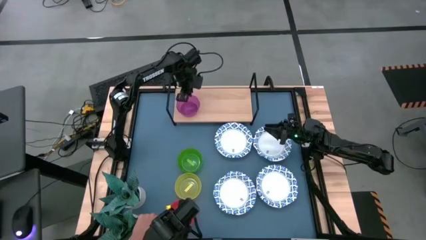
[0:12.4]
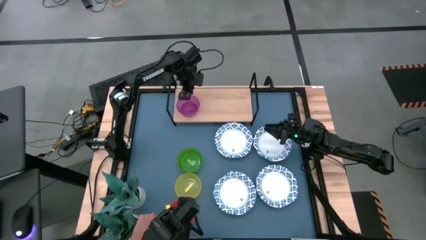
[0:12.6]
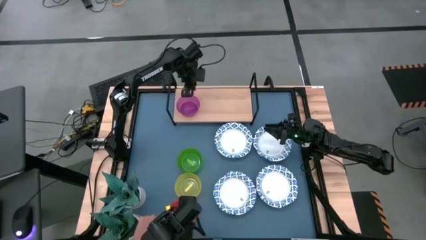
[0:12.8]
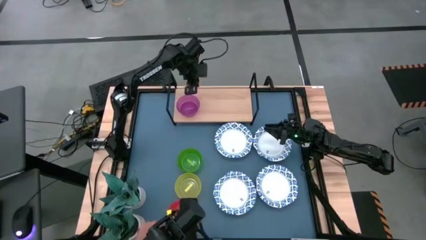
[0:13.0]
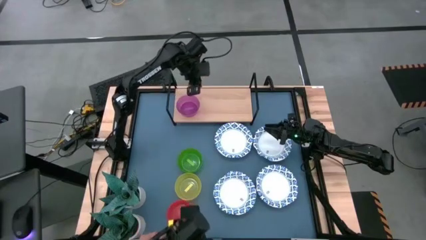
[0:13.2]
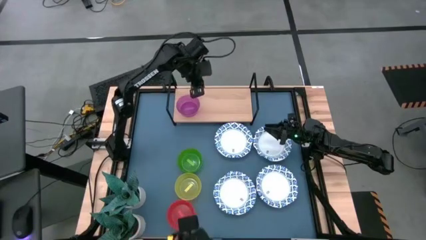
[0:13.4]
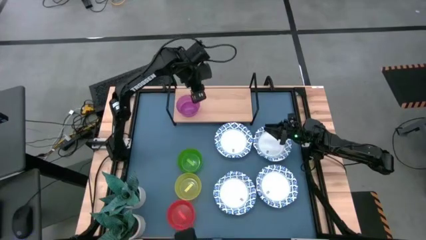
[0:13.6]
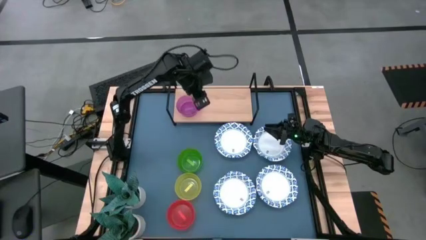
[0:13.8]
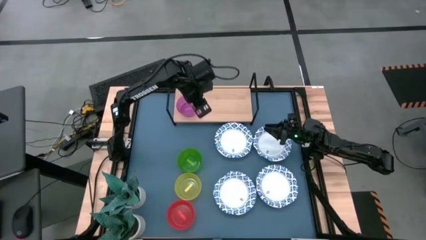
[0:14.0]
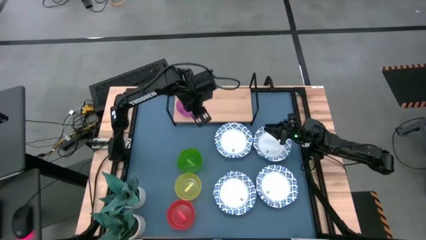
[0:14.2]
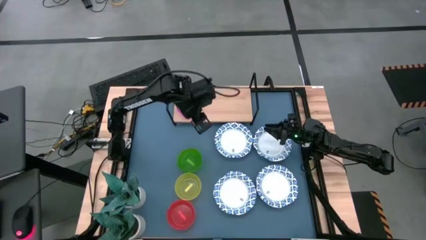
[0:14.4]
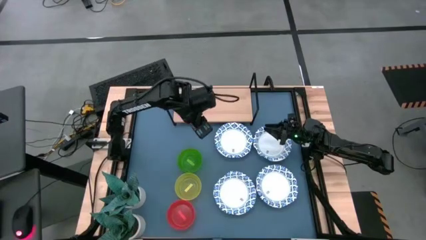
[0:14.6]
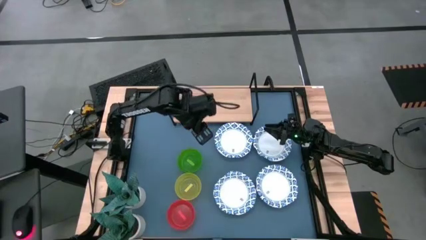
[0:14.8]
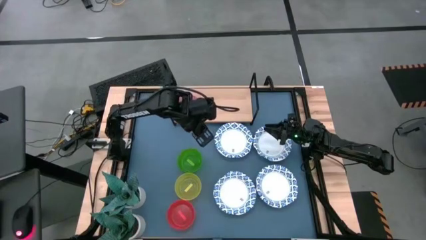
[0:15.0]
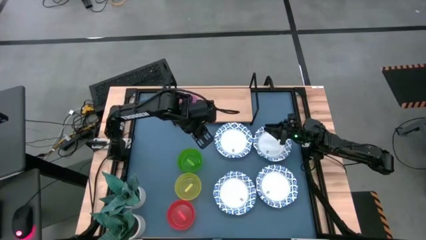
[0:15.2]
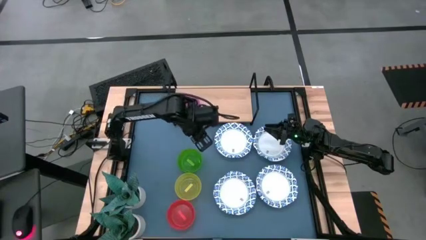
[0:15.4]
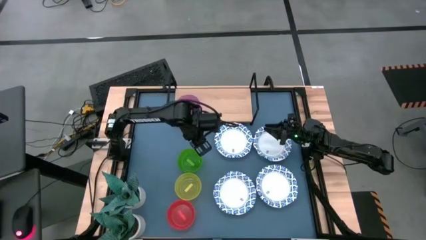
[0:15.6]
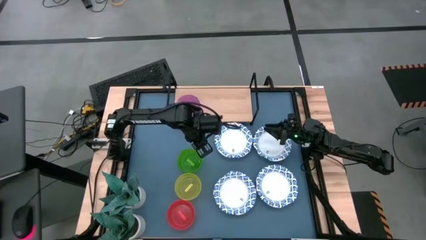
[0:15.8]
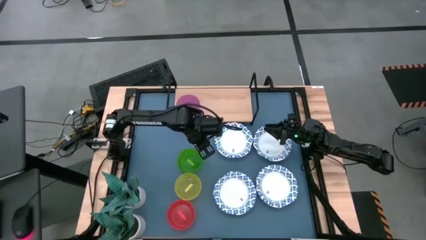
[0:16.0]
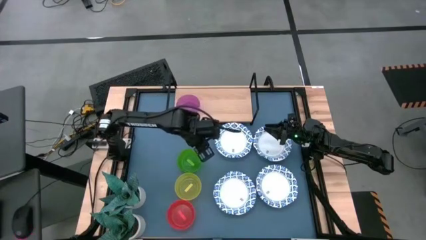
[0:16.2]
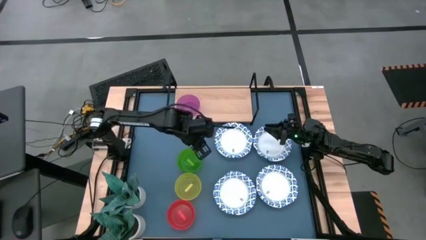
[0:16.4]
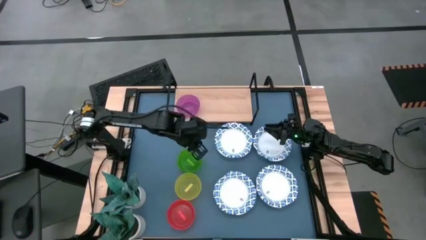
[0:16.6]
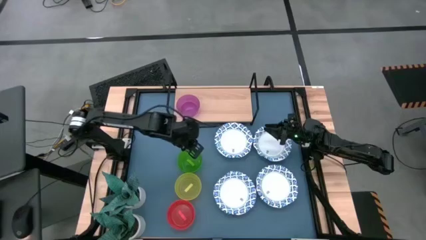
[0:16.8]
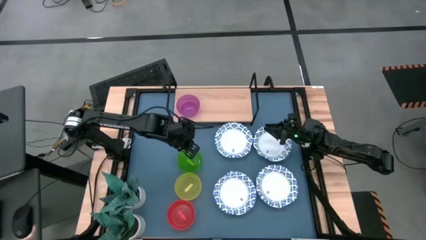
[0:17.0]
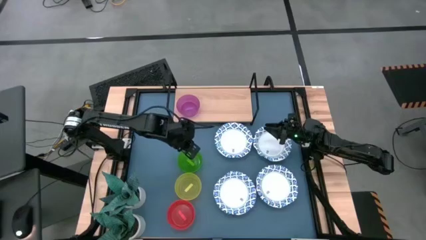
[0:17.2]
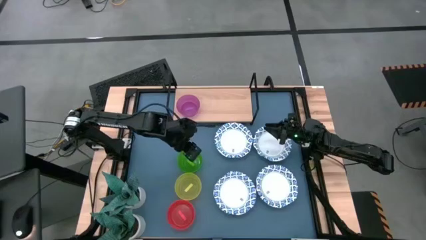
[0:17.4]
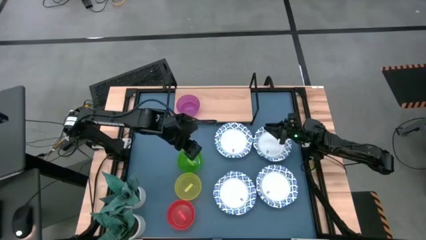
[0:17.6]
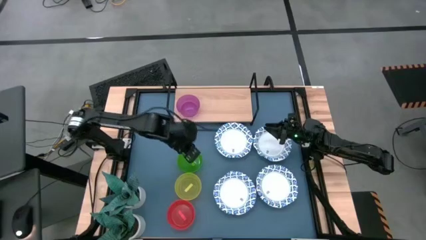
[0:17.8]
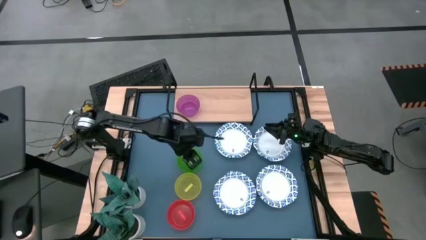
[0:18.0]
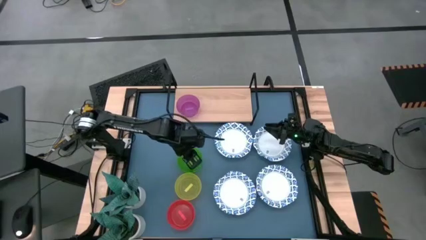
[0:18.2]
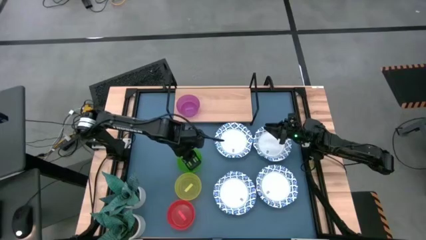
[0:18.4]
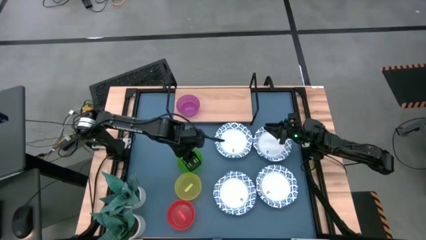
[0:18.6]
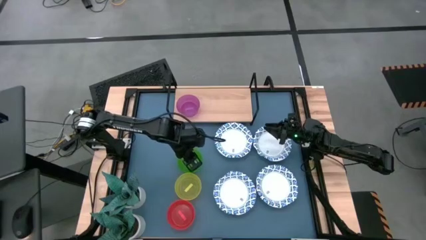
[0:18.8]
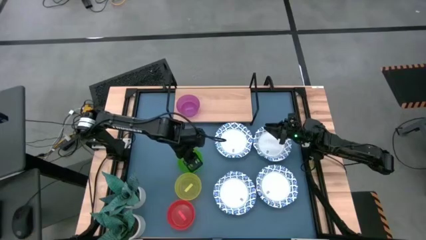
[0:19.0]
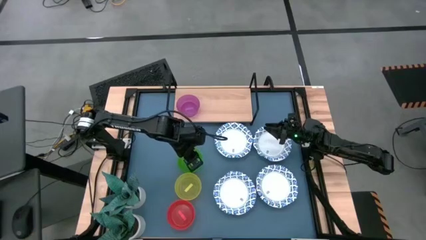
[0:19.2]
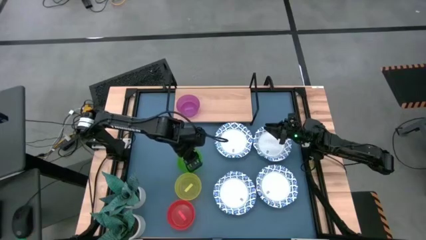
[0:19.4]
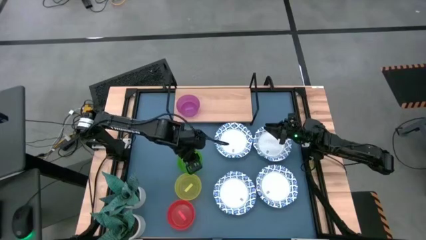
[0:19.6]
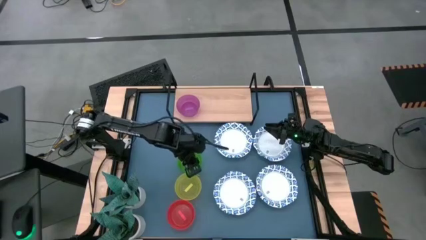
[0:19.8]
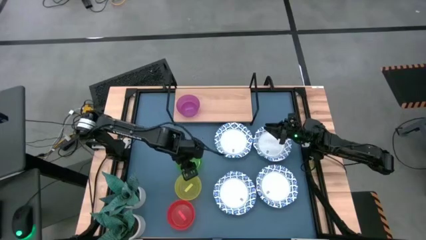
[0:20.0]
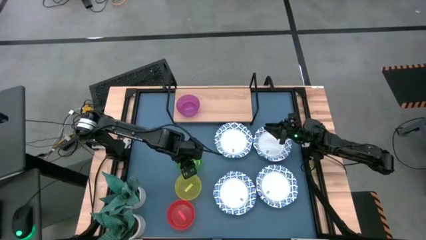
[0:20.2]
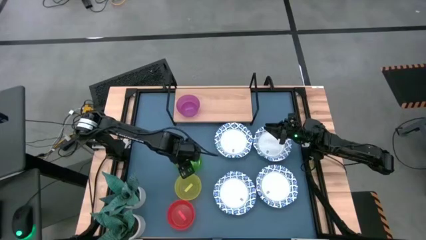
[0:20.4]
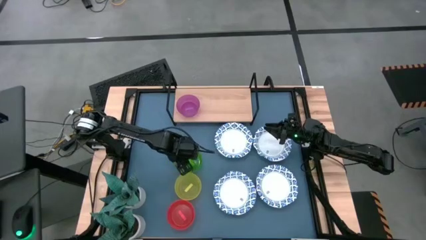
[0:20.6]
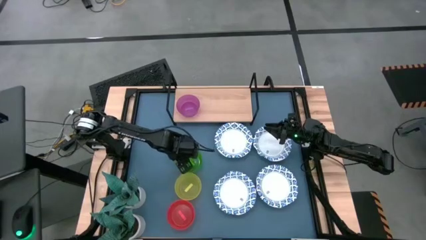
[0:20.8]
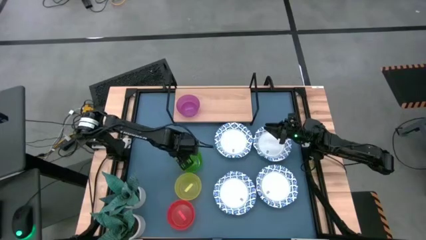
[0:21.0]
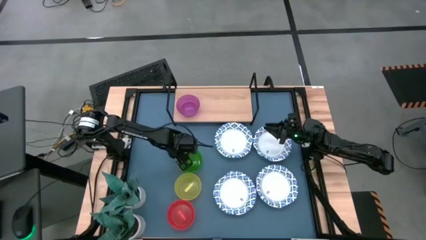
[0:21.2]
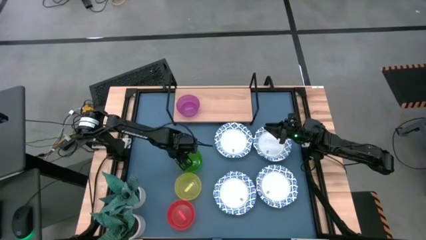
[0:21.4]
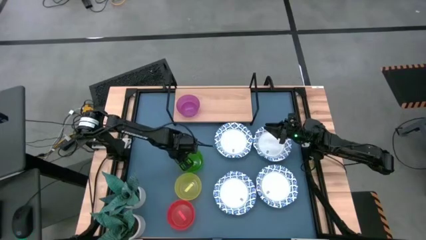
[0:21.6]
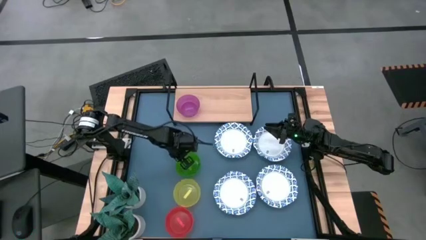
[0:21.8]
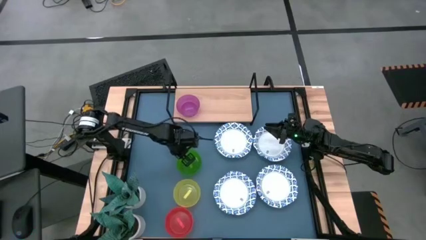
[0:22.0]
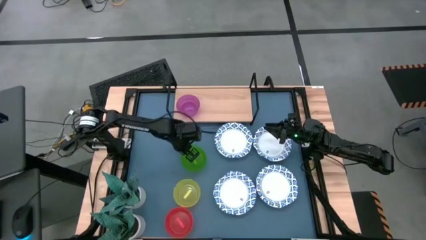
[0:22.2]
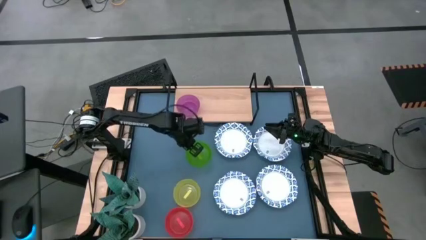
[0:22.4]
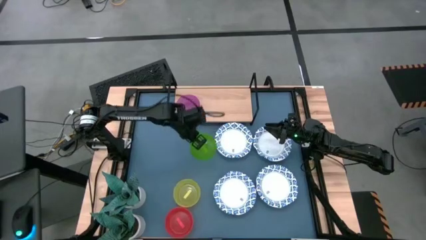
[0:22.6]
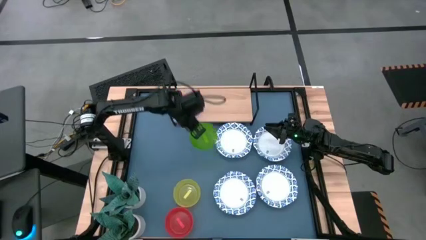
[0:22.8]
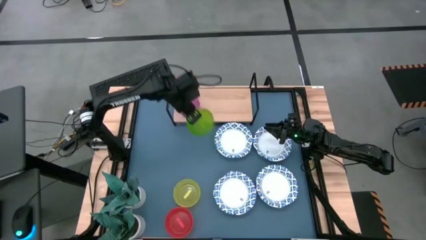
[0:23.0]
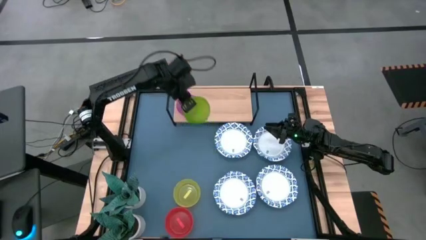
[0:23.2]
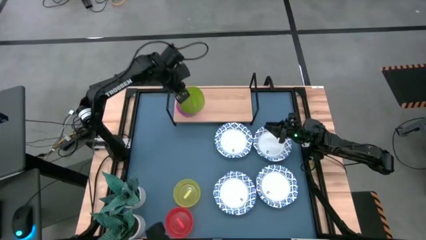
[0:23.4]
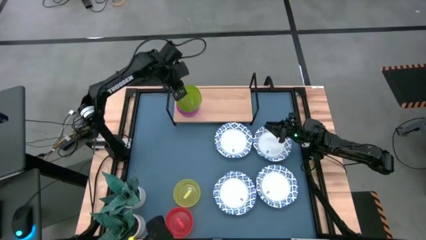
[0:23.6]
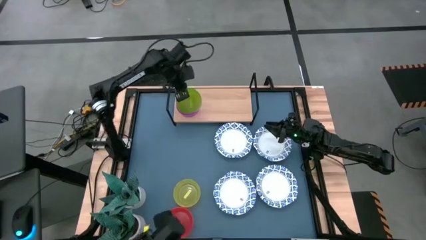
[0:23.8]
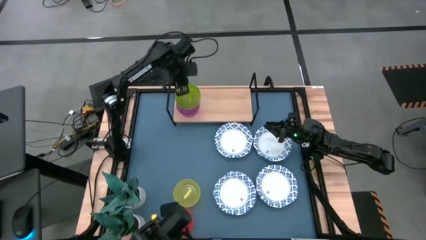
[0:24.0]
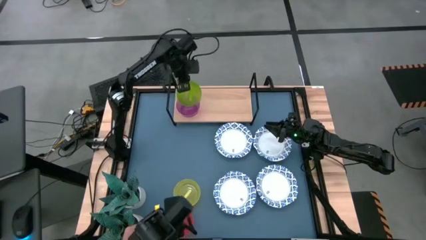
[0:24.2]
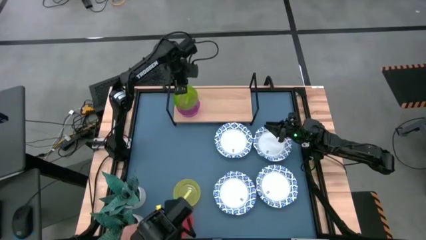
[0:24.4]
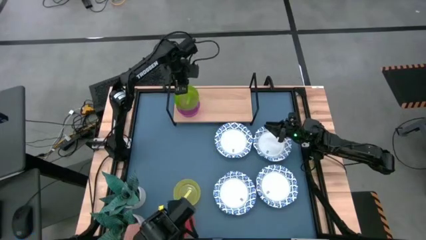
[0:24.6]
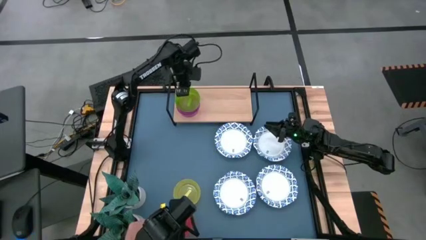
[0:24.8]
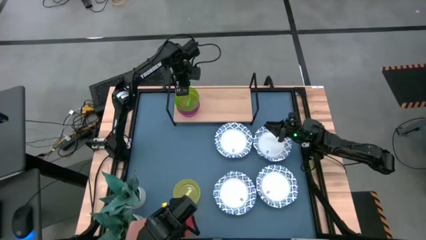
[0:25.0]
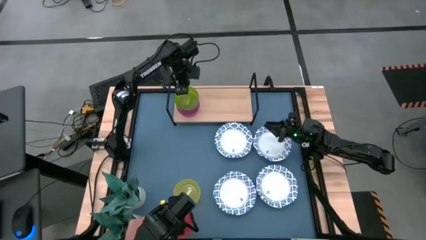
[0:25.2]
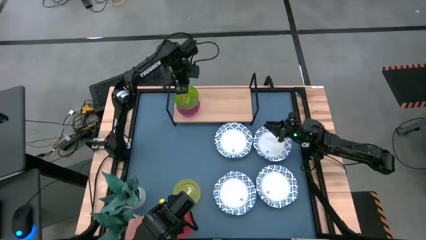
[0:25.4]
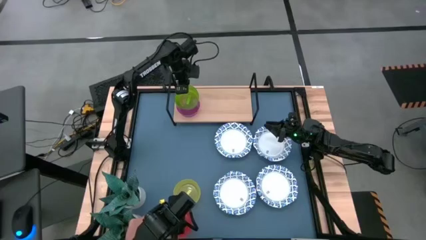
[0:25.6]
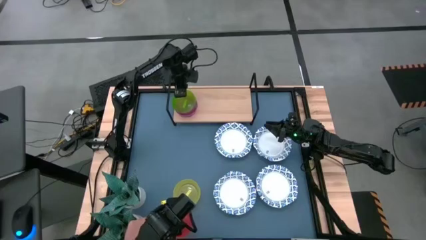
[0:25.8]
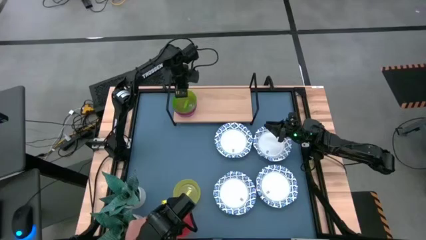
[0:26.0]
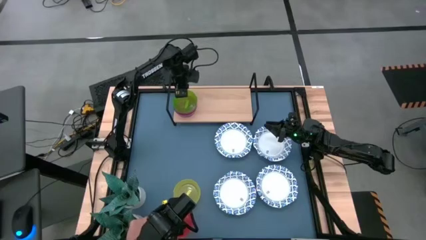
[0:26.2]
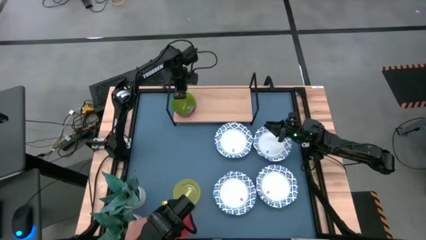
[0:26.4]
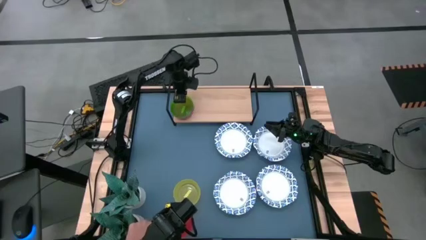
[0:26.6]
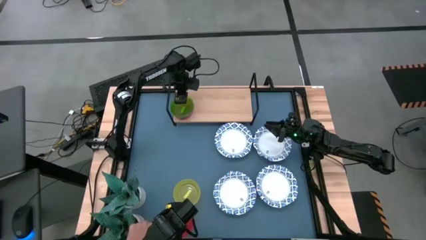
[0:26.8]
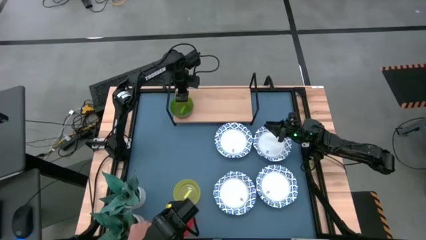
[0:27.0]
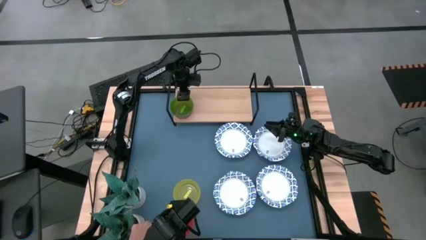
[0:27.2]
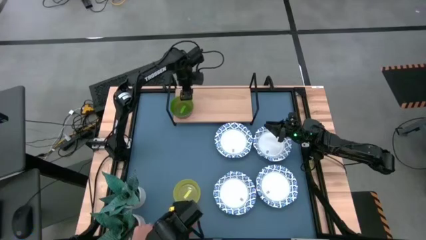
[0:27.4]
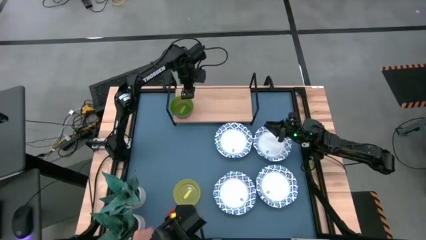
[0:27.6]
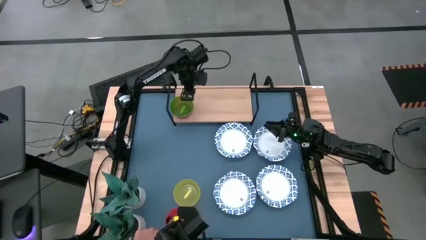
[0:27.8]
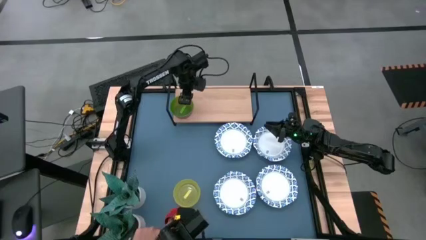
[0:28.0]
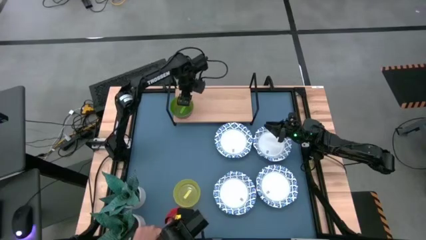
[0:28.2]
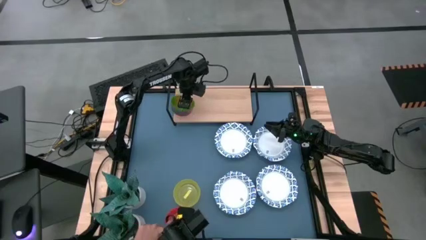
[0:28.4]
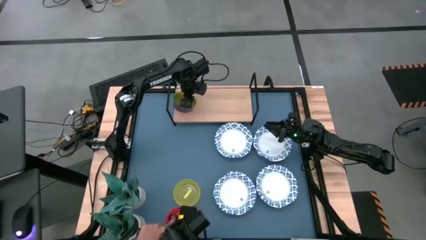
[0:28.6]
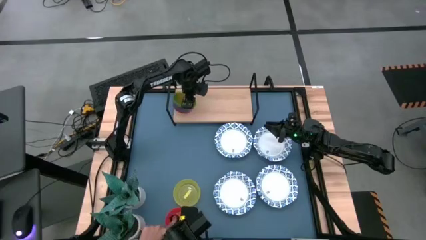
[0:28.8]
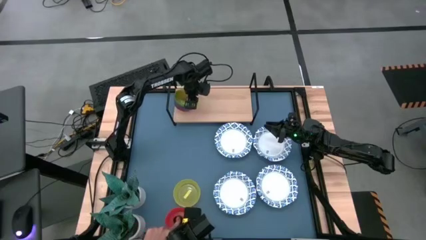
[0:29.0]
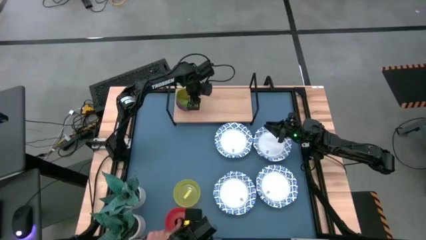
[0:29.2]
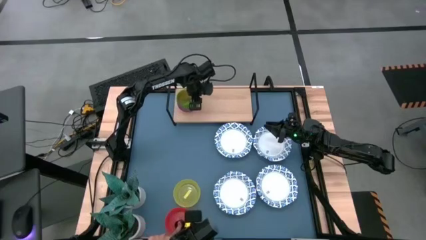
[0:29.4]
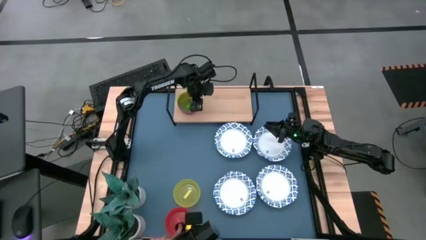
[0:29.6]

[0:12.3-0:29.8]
Task: Place and stack bowls onto a shelf
Stack the green transparent bowl into the purple transparent bowl on the shelf
